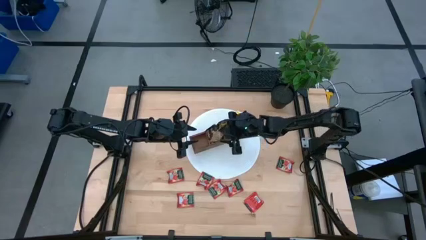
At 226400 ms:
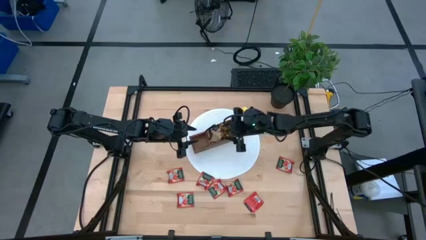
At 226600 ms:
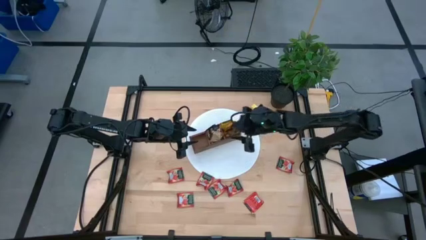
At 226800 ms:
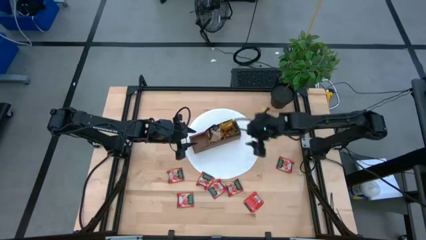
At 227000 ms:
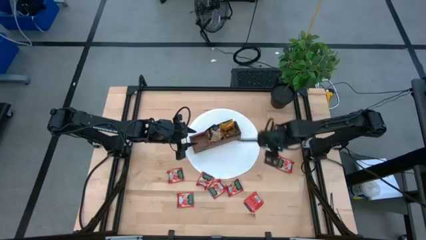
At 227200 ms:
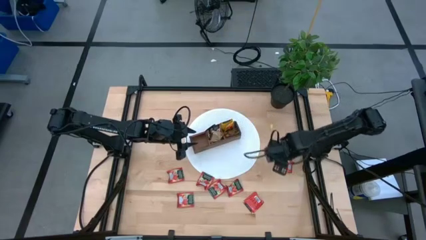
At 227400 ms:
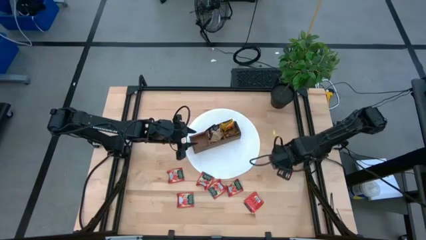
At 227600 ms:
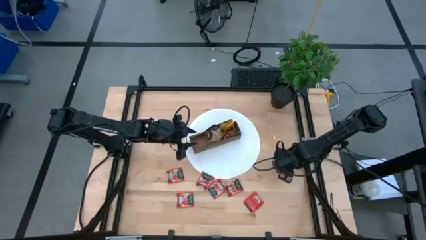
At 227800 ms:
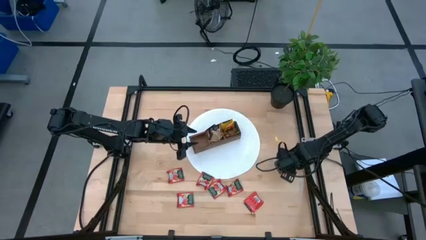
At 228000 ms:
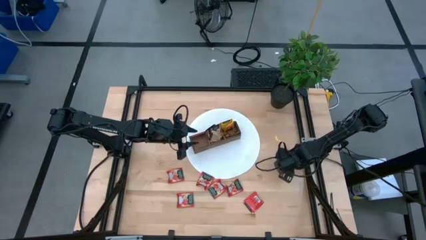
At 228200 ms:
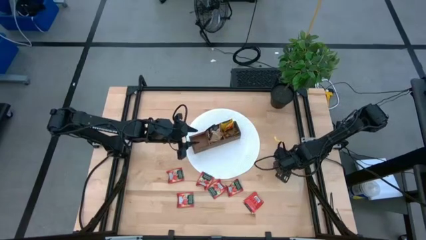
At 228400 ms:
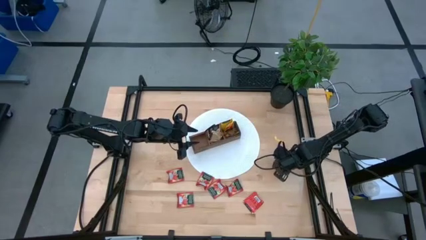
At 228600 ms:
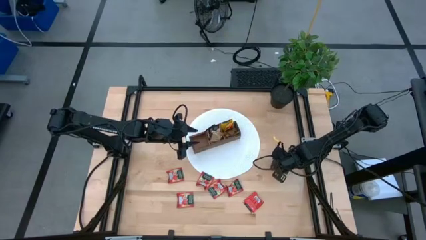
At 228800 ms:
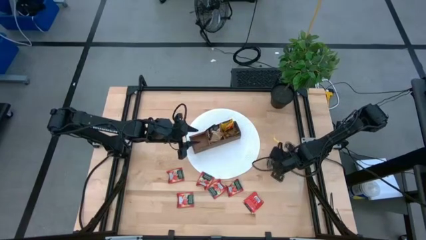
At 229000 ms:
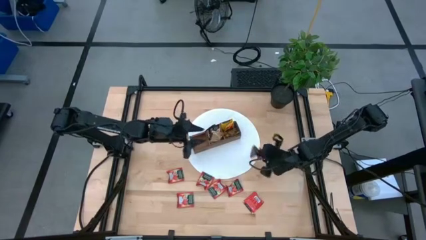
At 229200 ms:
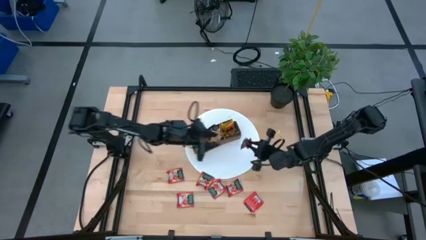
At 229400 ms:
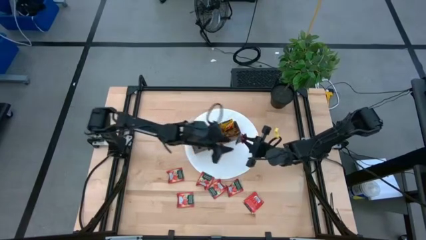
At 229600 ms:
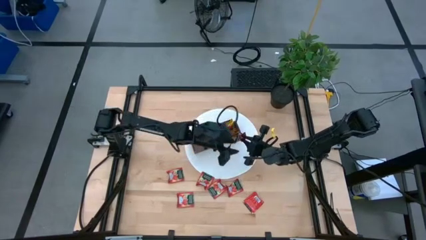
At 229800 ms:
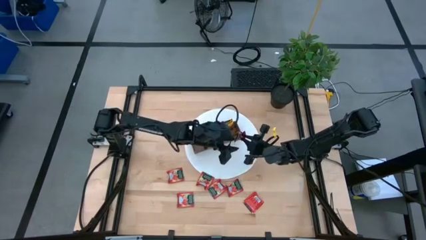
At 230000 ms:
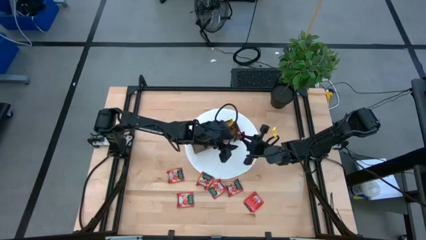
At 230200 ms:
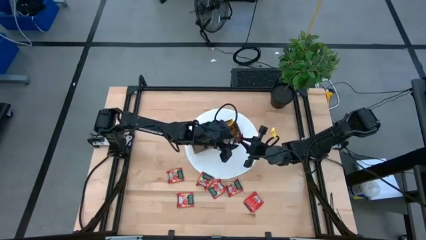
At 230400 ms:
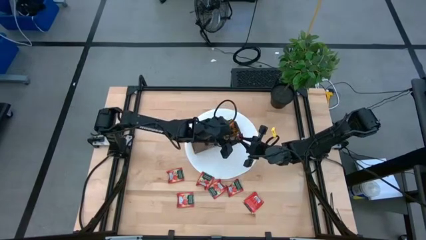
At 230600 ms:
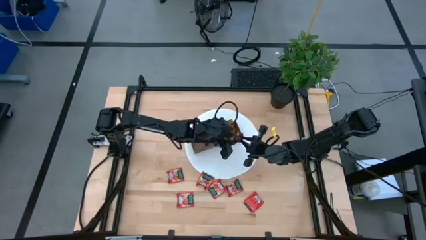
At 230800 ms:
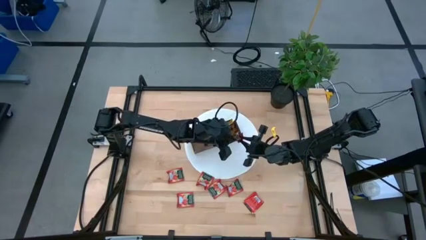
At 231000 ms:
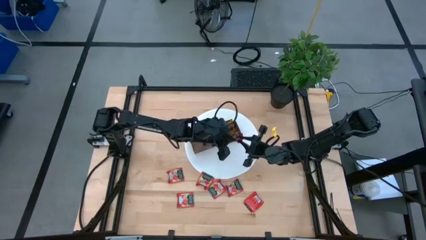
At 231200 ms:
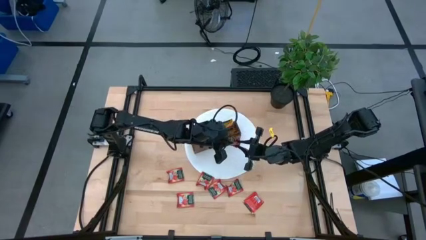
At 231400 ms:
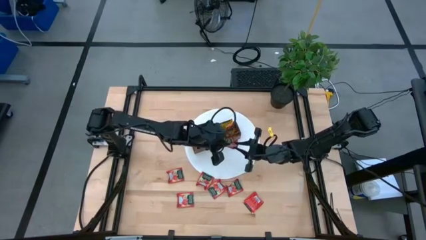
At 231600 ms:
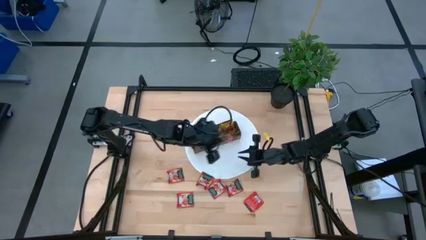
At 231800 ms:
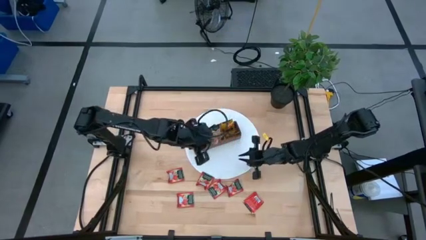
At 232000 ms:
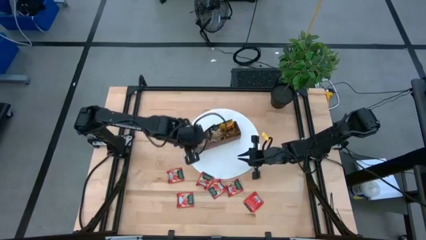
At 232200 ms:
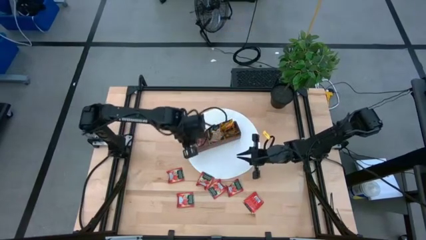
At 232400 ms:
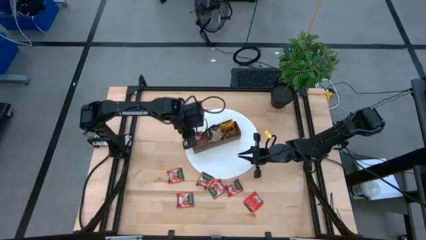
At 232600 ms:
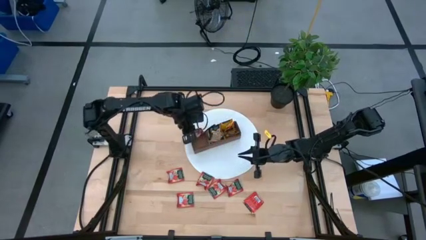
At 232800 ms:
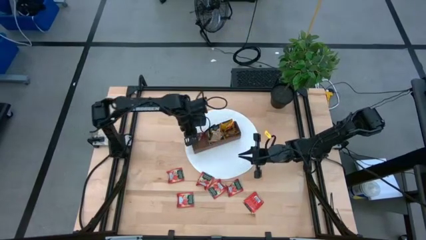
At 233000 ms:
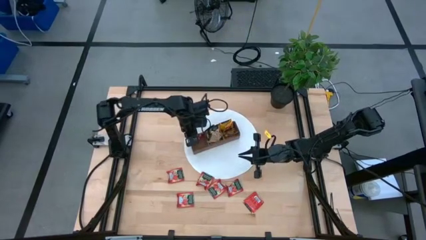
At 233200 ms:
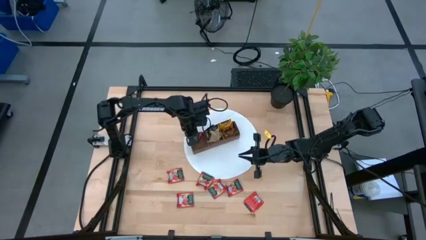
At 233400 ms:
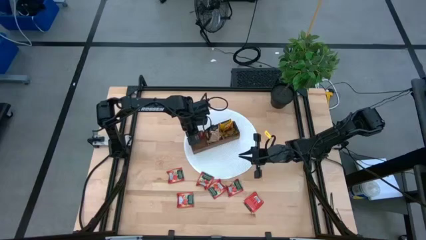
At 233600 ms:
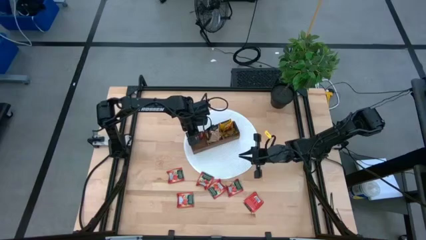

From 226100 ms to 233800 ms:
Task: Pick & Place Tea
Put the red tea bag into the left section of the wooden organizer

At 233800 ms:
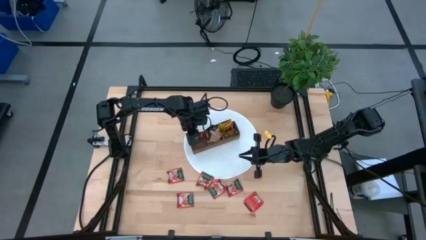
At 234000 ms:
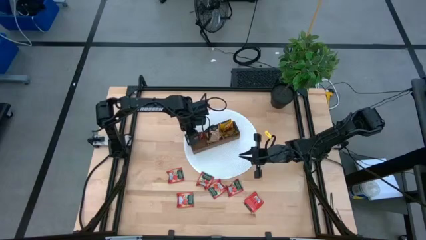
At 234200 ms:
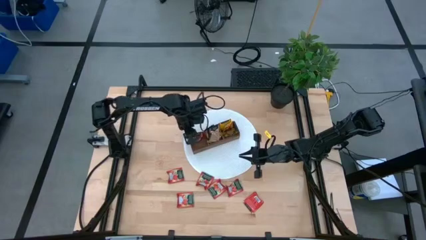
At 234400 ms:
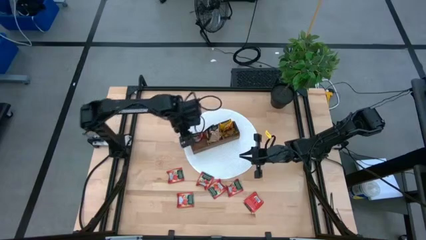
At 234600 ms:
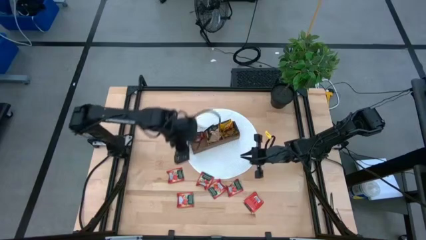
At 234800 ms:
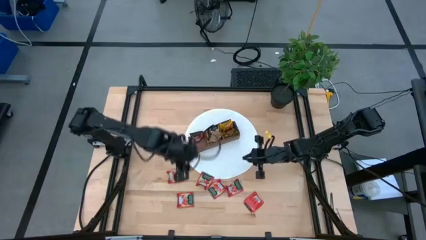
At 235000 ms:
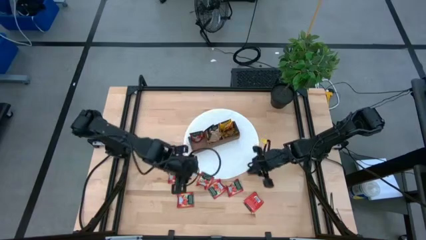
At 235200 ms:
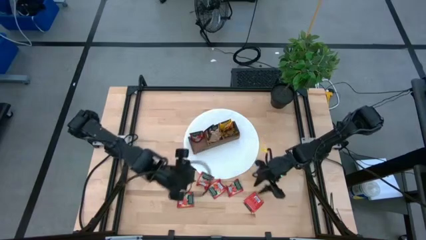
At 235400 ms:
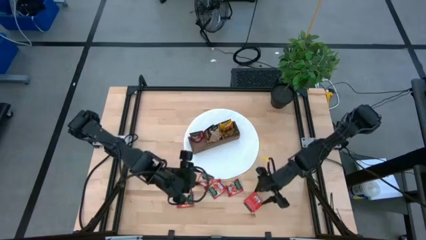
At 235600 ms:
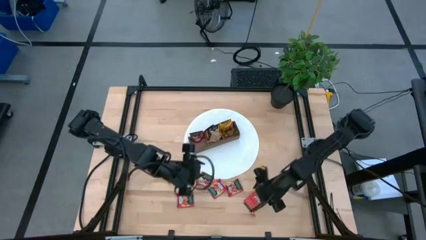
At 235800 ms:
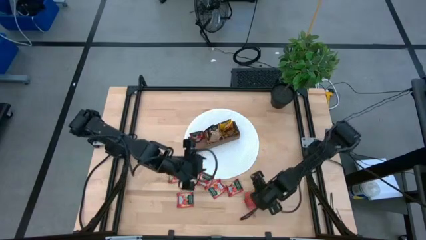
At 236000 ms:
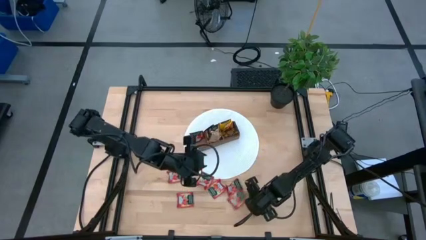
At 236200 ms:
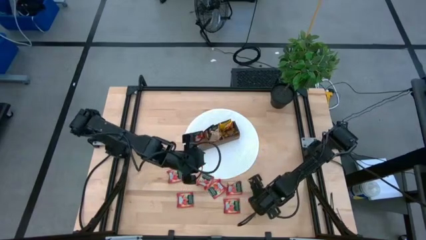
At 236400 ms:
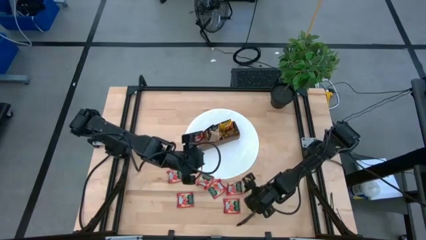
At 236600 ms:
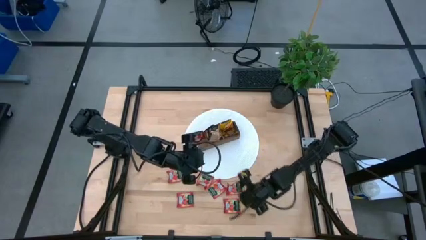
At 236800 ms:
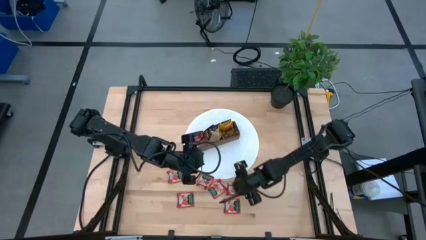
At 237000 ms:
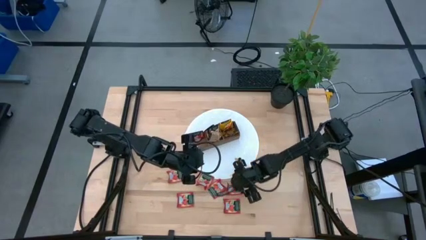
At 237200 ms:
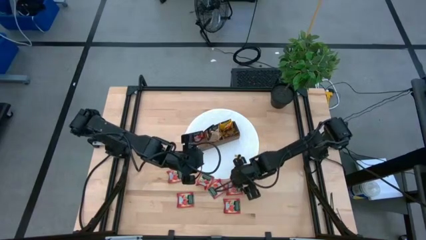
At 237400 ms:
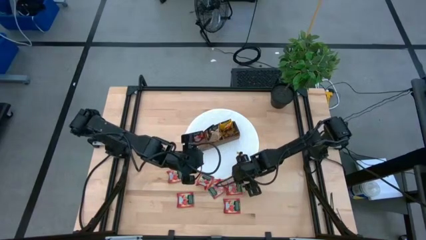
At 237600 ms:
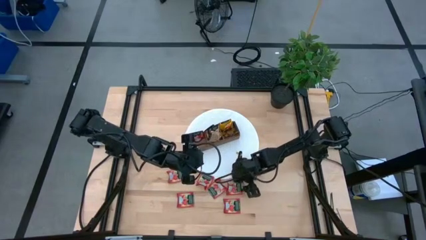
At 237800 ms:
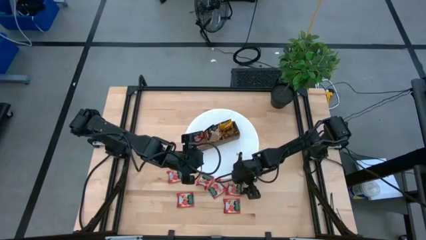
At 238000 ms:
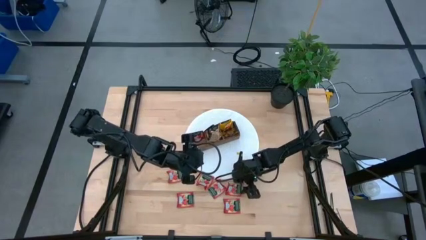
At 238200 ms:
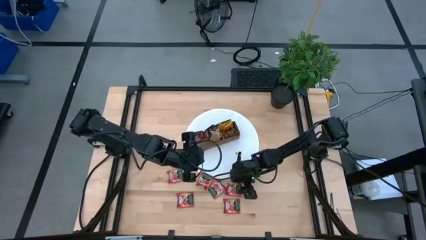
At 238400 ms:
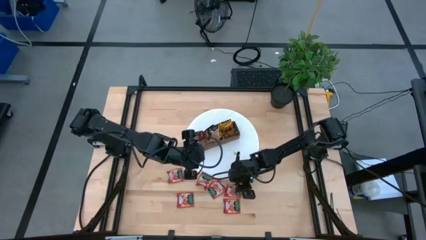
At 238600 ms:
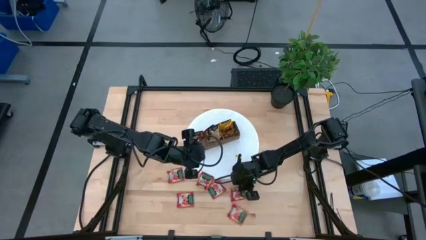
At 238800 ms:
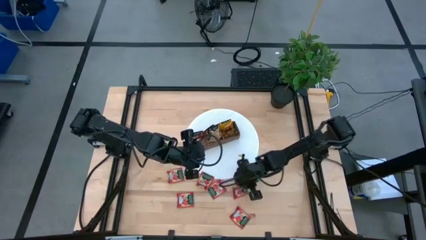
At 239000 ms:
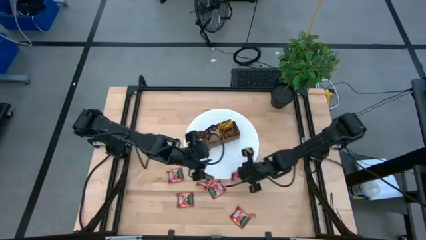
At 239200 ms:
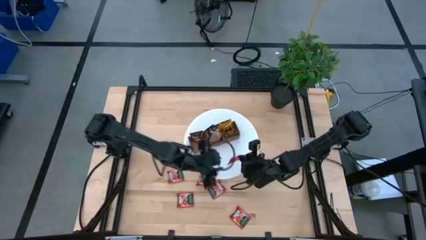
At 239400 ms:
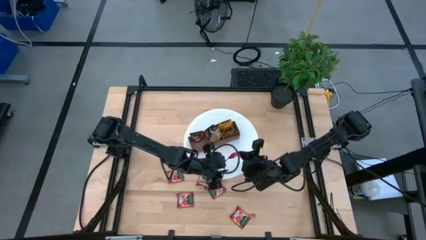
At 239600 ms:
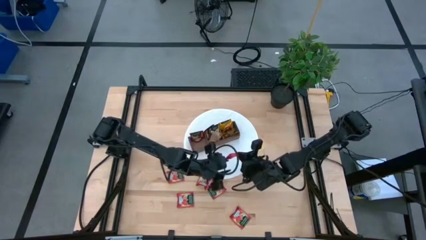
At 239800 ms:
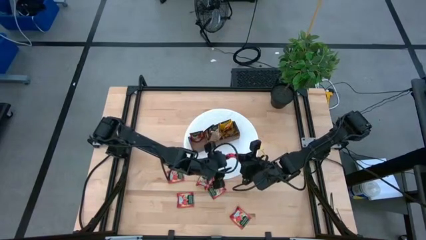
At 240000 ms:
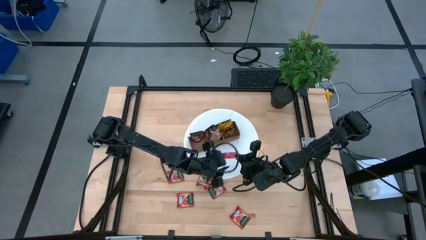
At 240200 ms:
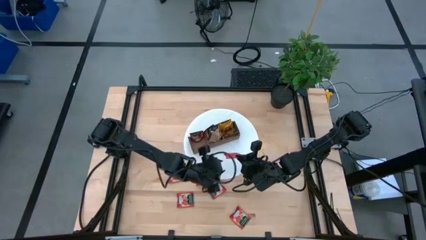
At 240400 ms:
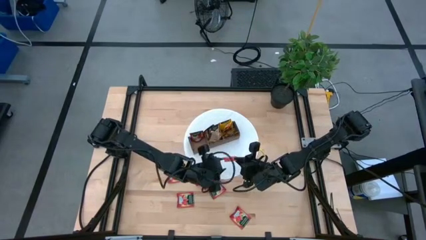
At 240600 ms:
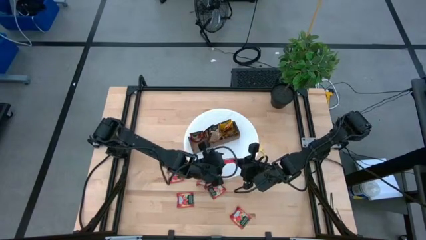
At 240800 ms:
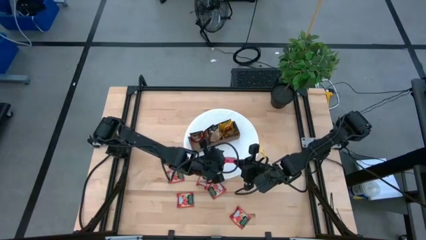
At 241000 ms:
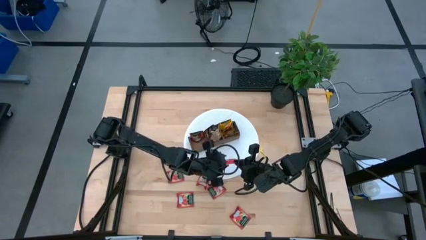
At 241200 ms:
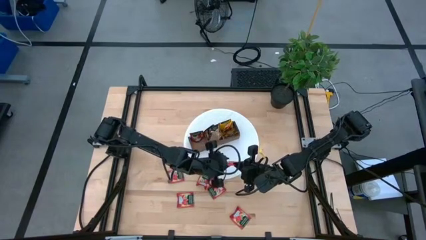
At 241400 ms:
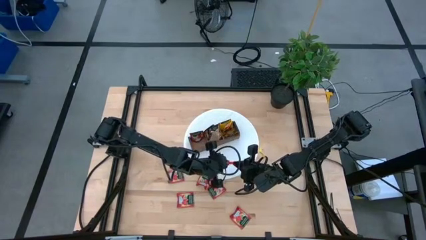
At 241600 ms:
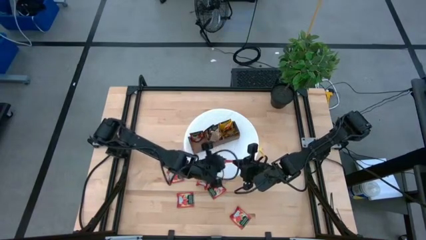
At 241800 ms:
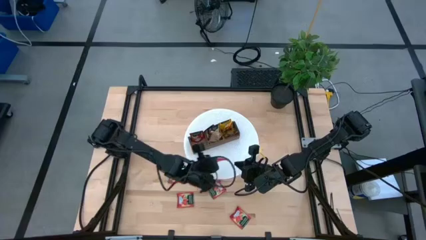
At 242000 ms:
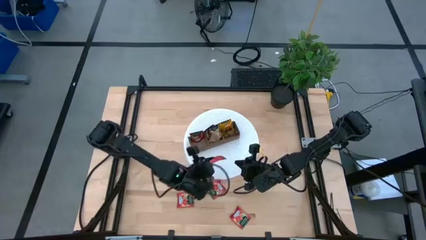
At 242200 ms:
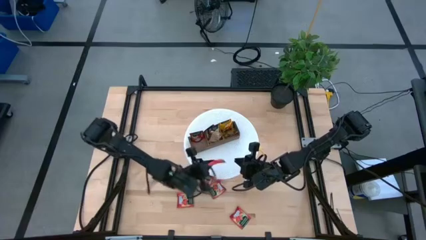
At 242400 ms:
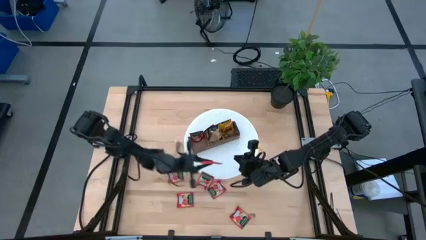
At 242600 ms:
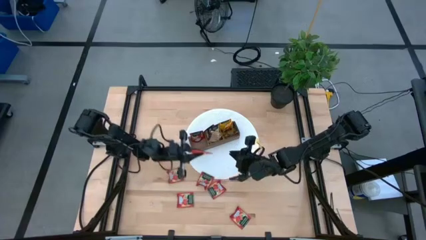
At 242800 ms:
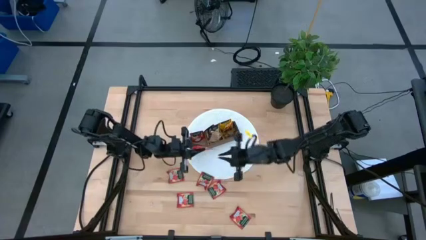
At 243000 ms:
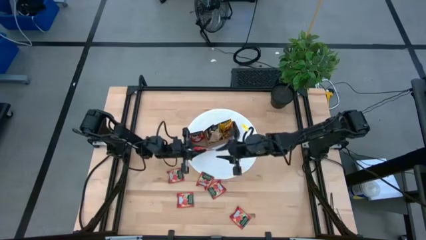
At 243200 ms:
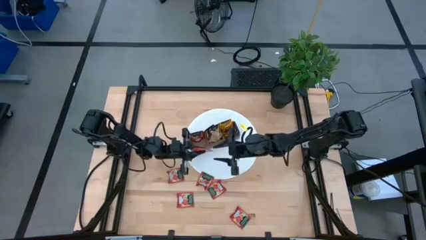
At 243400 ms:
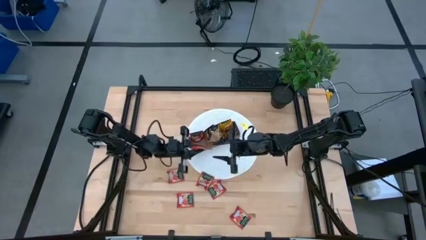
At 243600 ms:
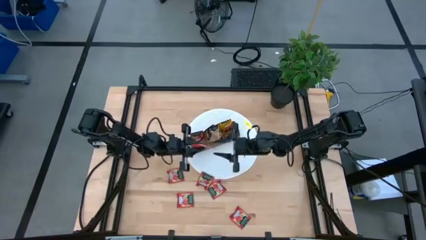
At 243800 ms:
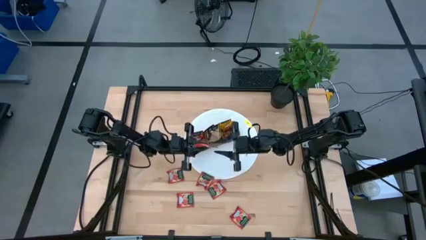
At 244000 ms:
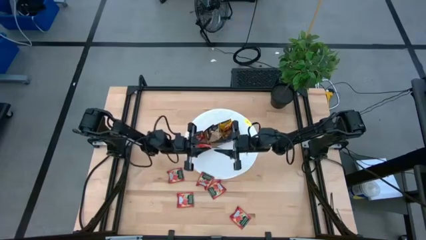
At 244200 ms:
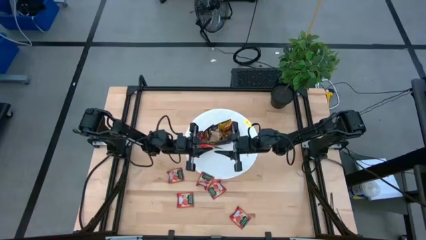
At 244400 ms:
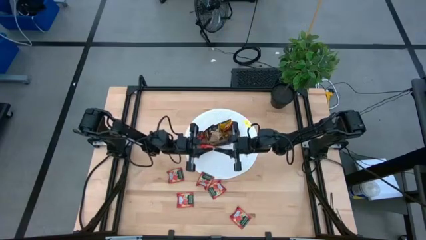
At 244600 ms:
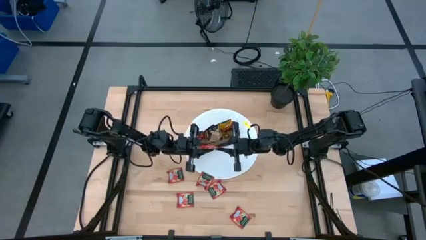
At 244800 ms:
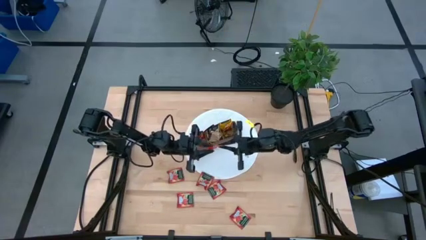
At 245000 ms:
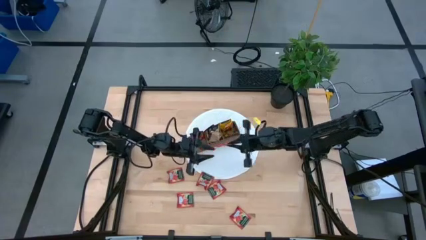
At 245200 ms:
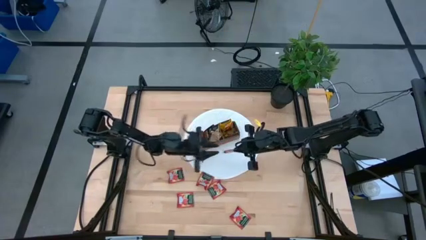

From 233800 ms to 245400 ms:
Put the red tea bag into the left section of the wooden organizer
